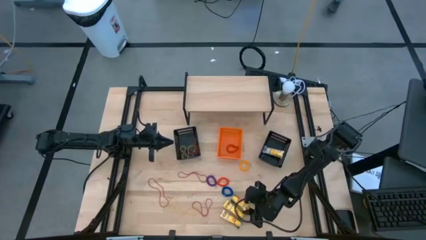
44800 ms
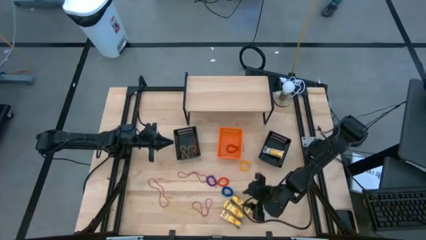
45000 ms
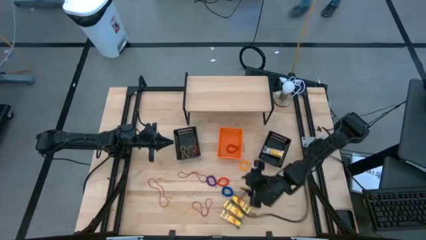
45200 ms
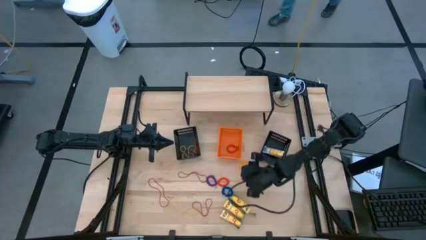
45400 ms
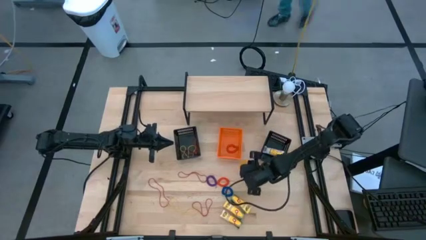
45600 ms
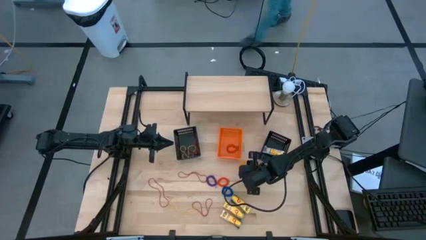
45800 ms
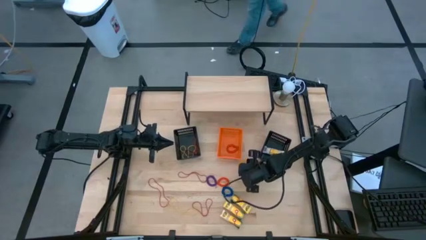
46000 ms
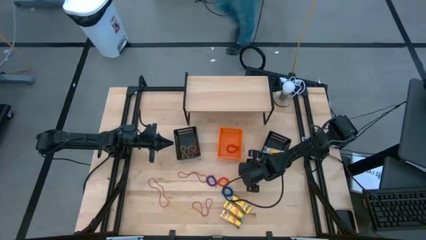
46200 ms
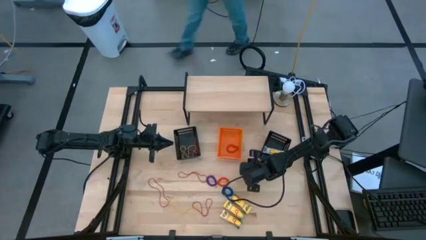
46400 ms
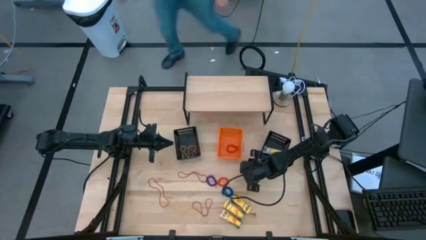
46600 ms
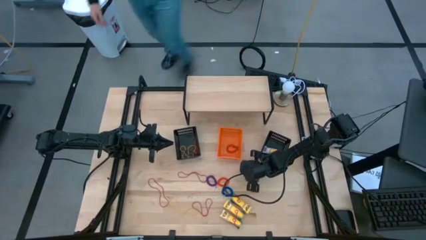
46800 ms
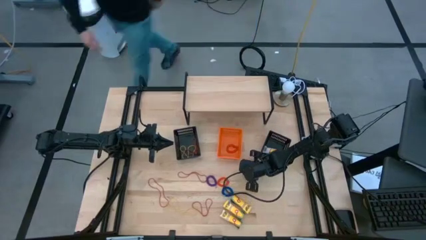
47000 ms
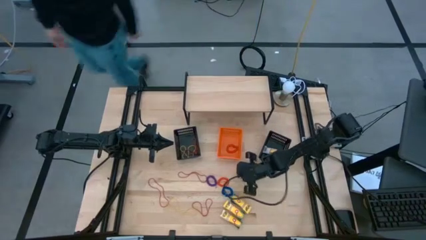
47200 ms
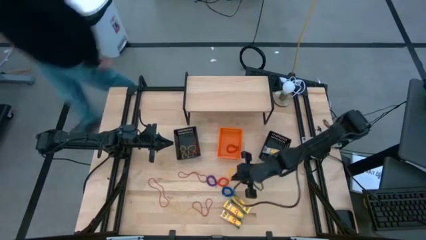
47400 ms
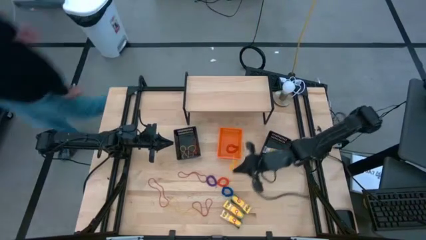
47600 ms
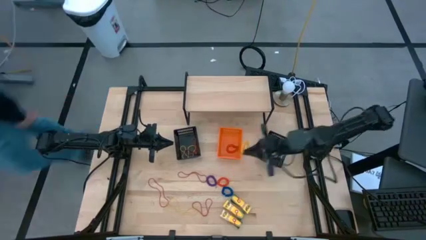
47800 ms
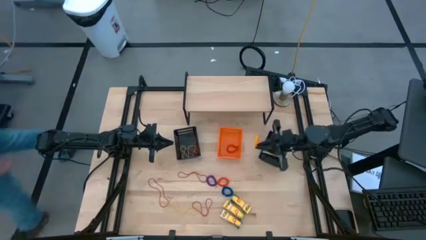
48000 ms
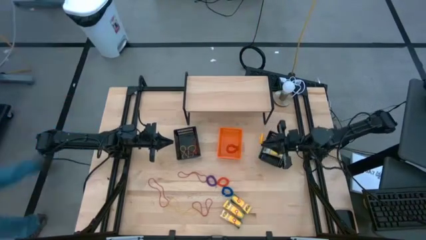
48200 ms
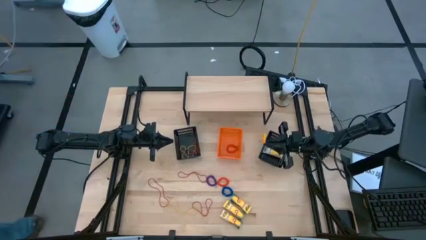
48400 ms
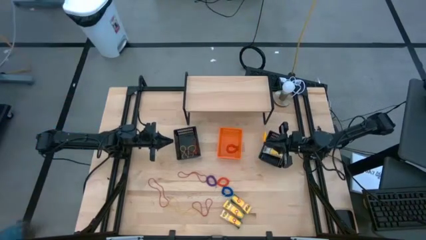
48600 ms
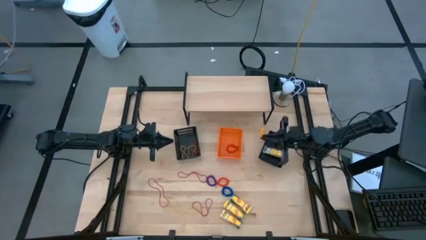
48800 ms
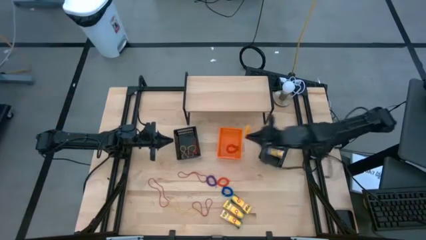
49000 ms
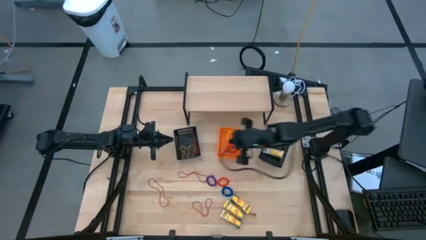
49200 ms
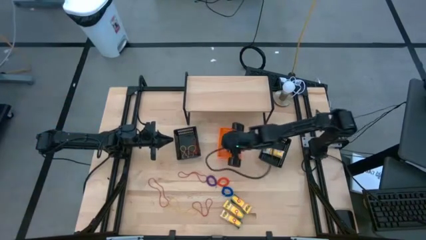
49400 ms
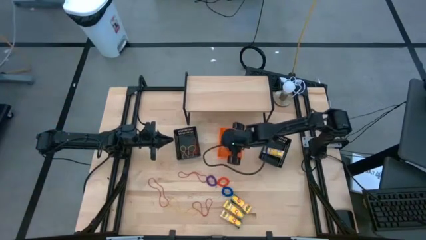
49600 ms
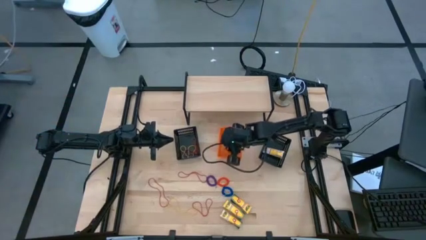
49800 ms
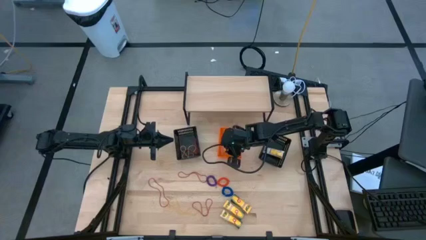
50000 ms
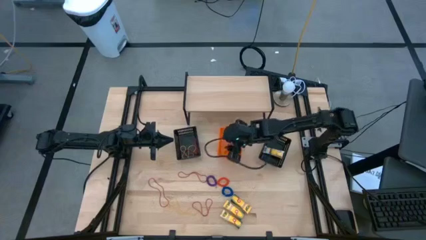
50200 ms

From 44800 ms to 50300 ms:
Task: Pick & Place Office Desk Supplies
Put the orange spring keychains into the orange bin

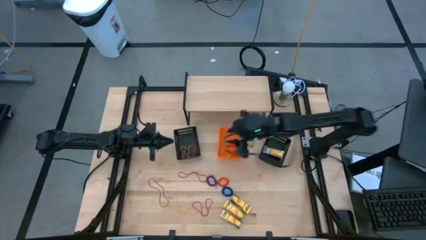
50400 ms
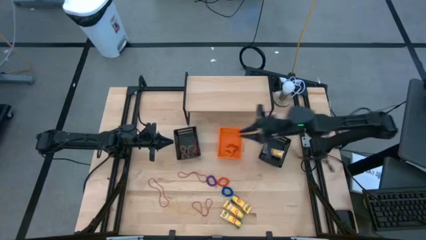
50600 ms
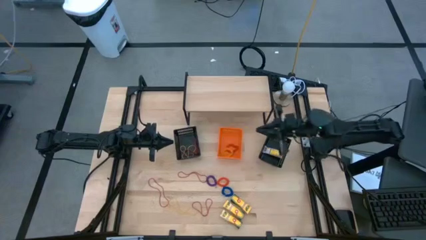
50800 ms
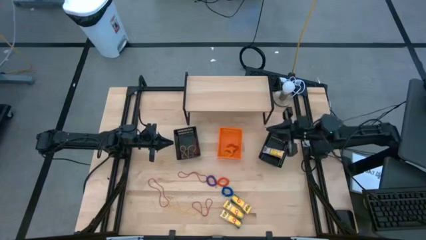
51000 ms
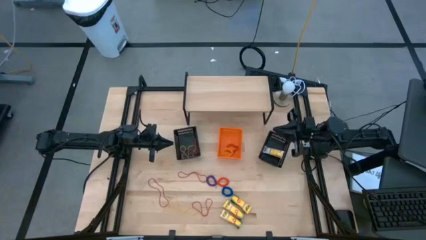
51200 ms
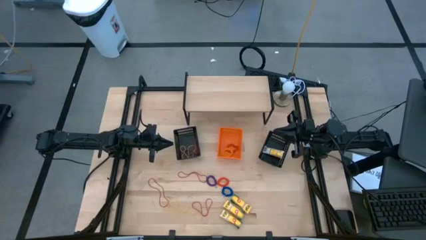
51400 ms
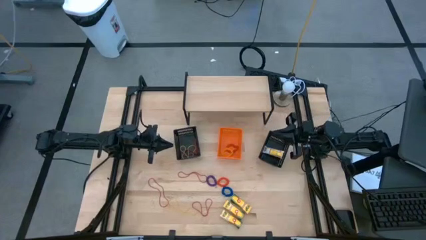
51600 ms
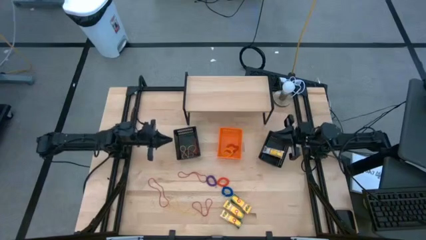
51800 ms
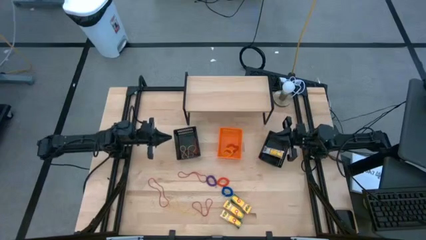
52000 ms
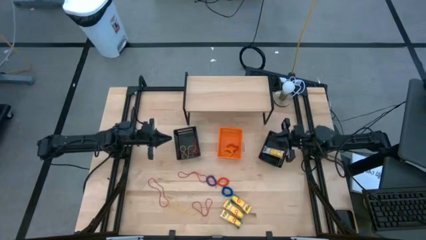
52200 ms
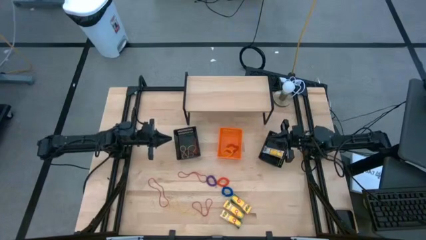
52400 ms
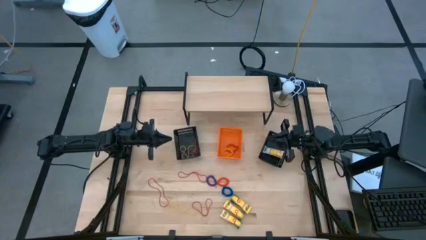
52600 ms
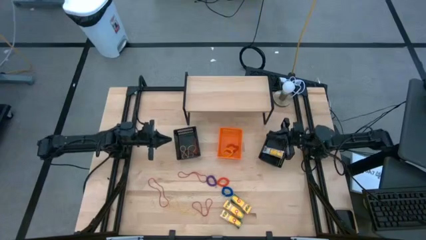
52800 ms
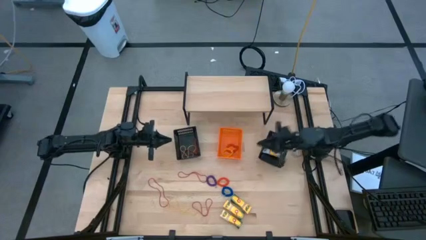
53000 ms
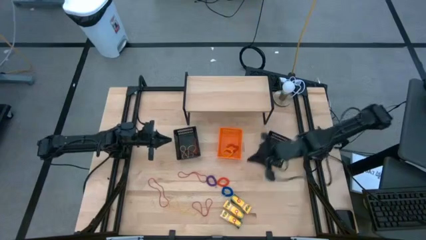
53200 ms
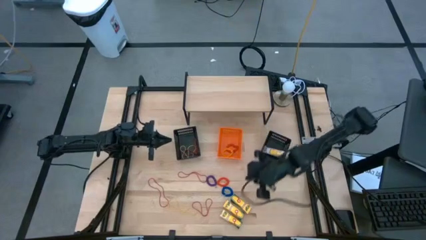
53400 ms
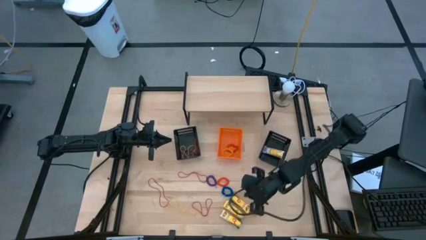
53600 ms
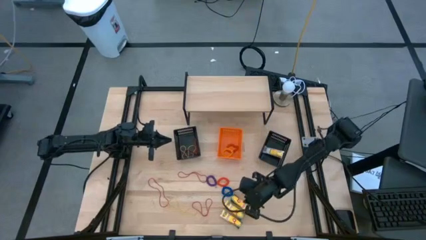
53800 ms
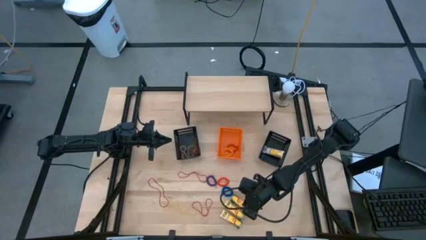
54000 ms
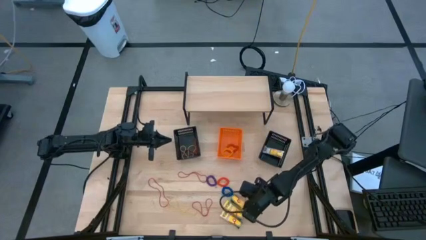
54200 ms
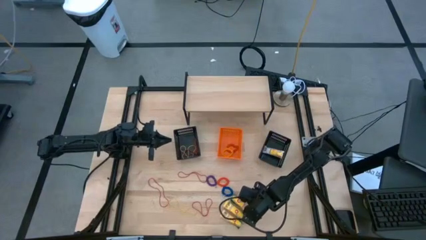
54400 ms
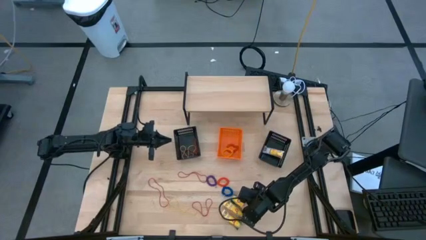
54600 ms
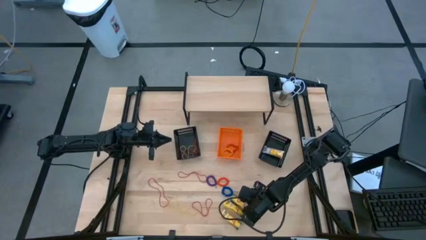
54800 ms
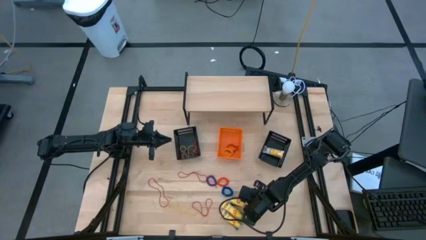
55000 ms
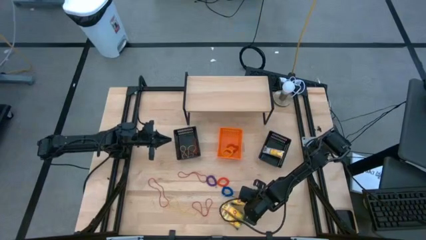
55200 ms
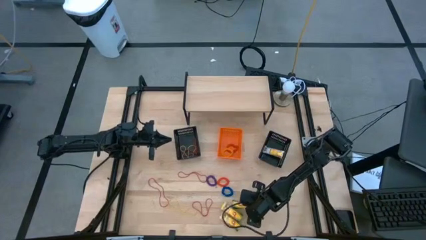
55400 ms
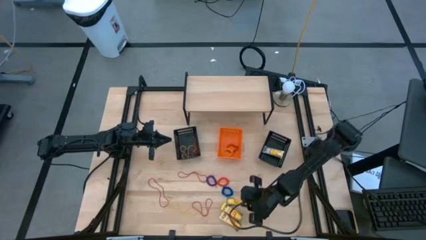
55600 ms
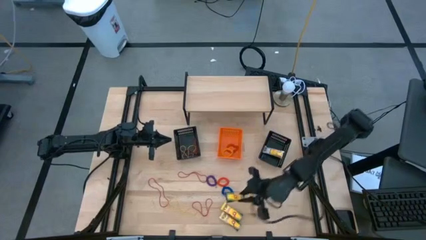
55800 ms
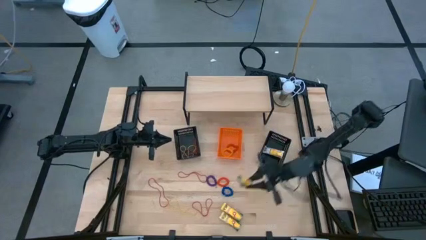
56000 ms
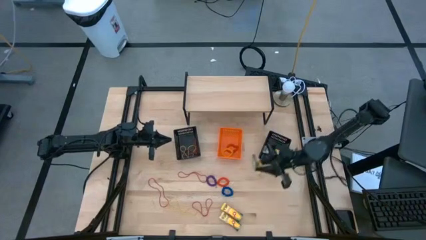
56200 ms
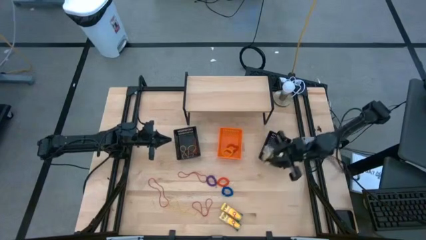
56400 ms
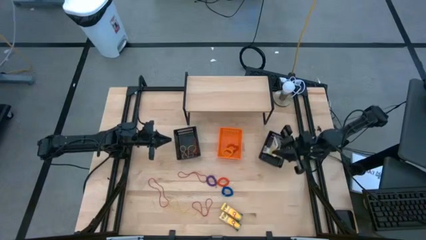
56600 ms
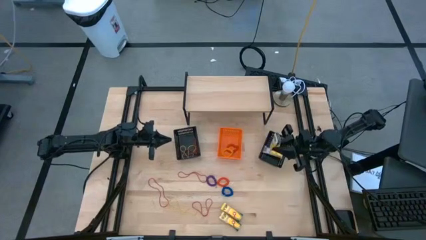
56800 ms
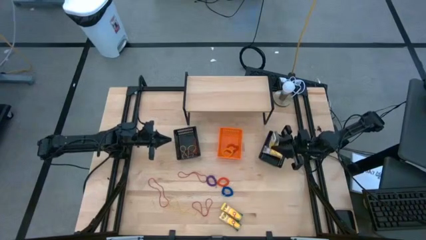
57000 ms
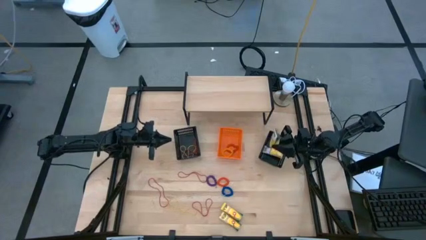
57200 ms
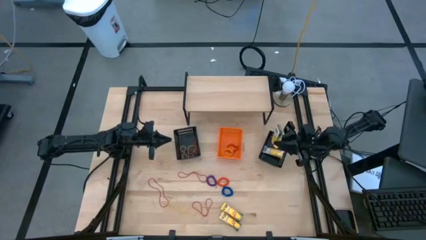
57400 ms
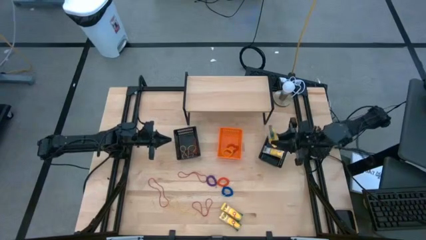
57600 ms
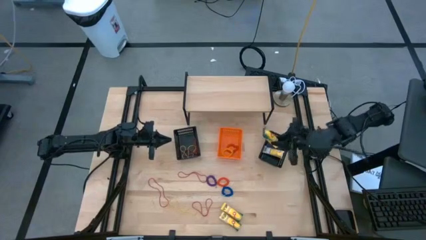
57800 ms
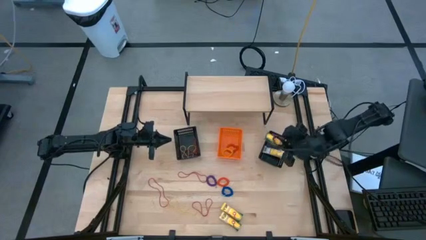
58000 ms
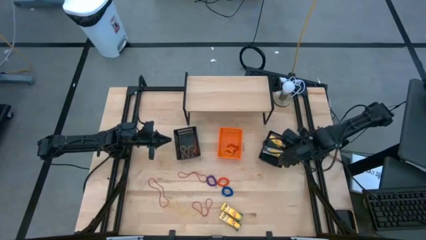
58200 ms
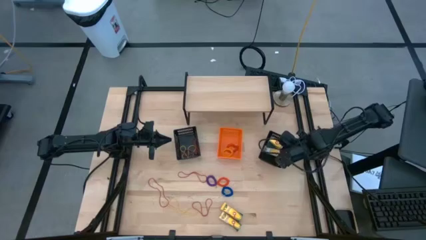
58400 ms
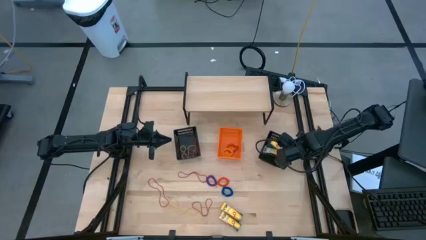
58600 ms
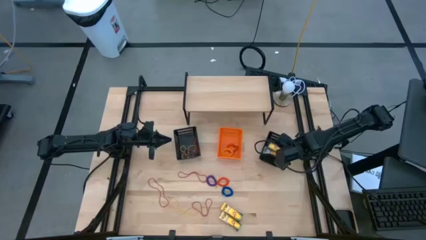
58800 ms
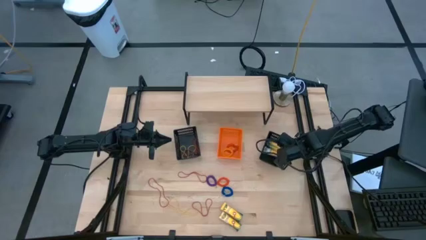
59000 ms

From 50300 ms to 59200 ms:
Put the yellow crayon box into the right black bin

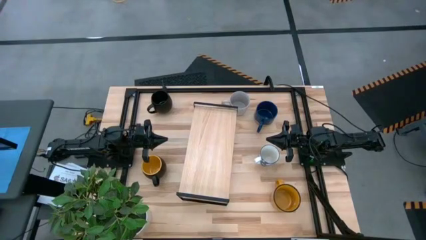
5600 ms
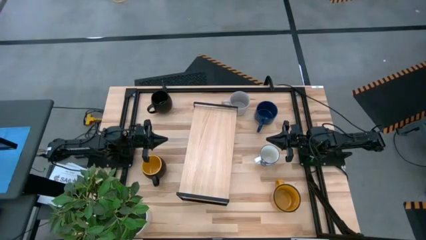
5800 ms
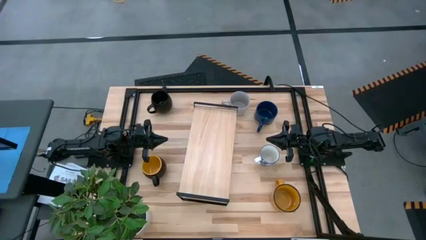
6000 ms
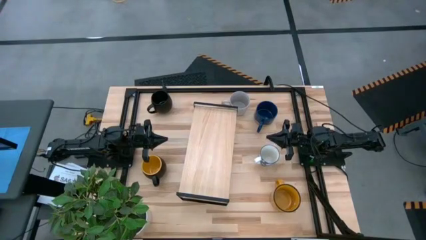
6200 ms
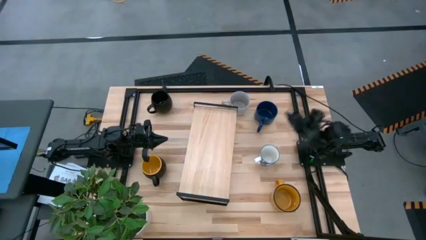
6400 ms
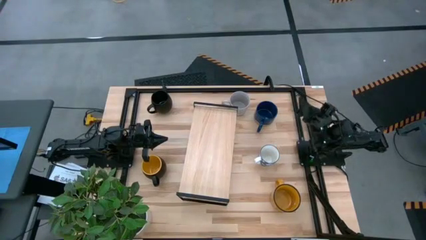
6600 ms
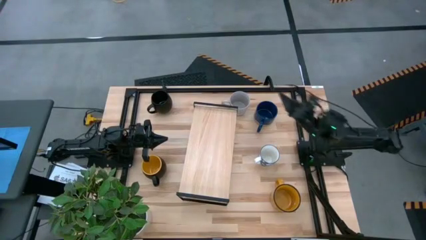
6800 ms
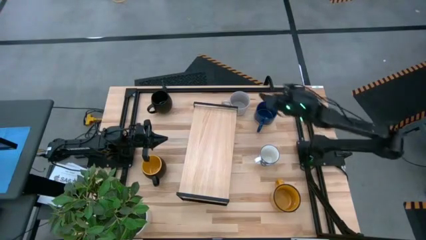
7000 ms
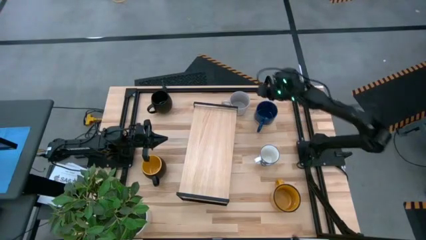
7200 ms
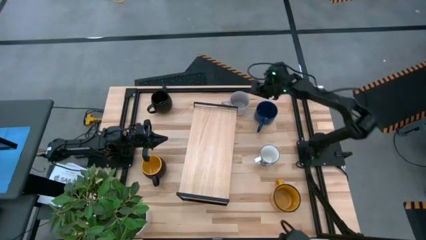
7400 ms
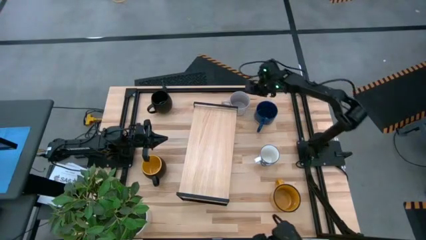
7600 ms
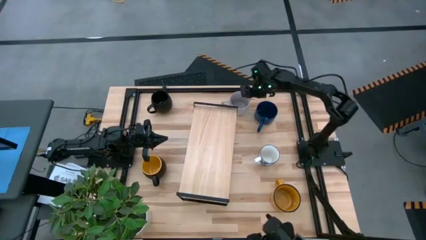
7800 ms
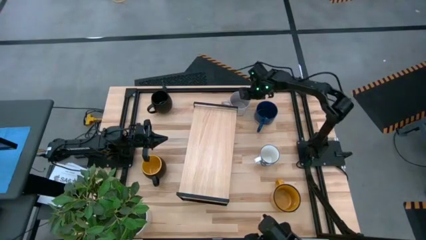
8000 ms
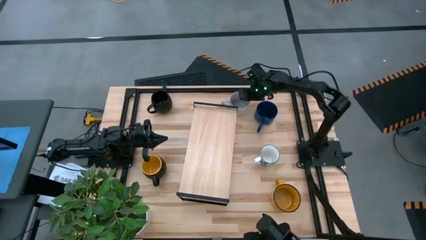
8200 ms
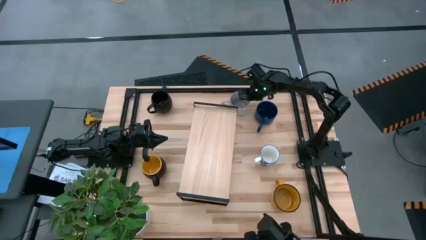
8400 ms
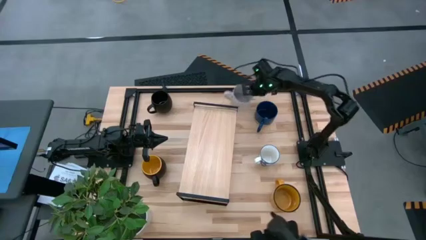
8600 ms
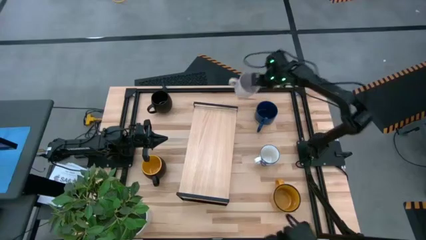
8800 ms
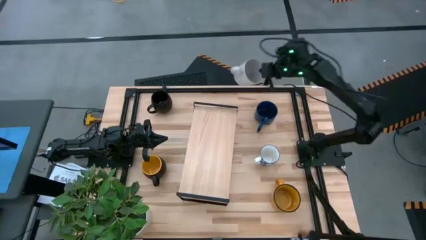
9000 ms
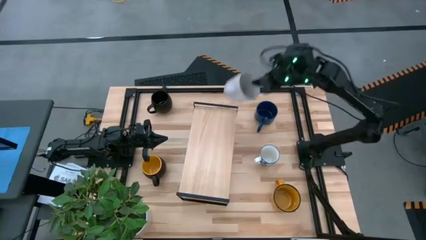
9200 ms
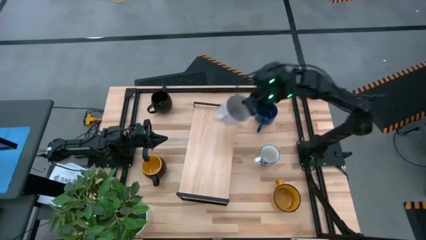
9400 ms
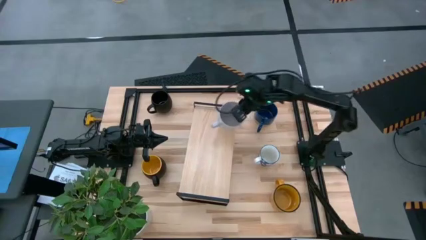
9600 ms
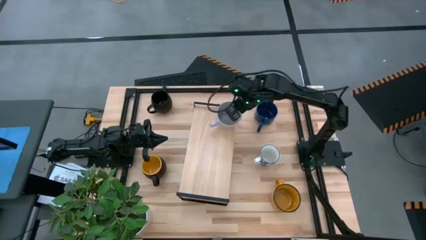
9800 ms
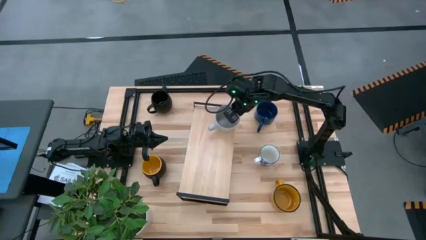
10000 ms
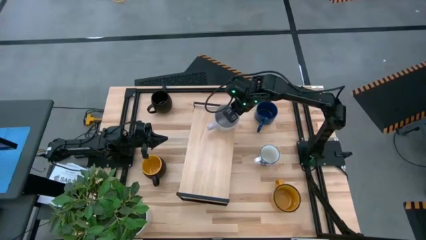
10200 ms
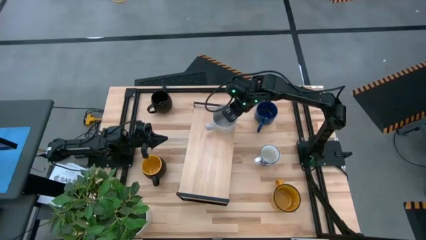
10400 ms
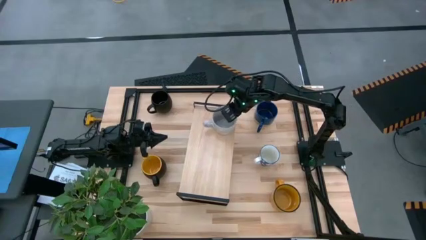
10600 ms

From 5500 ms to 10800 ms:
Task: Place coffee mugs
Put the gray mug on the shelf
